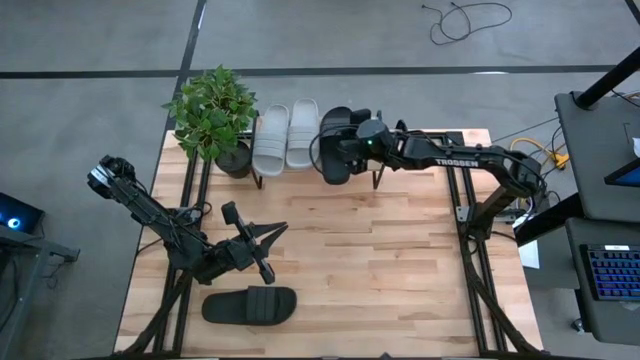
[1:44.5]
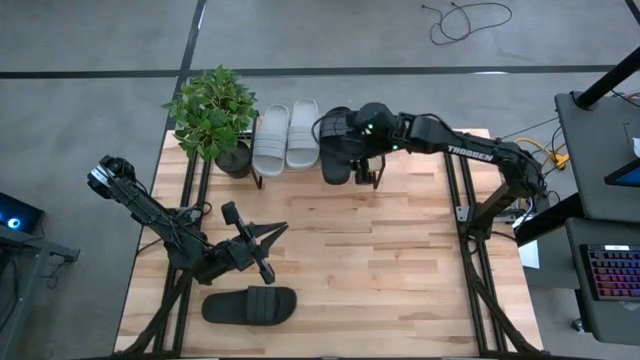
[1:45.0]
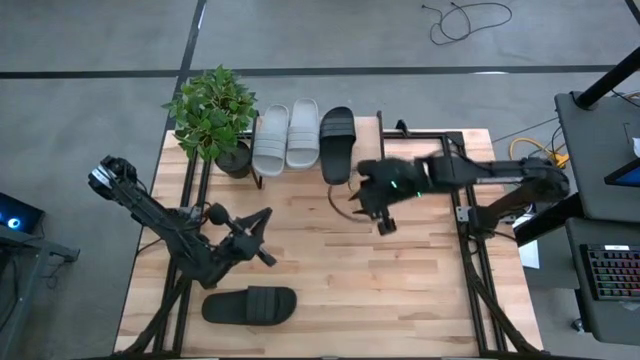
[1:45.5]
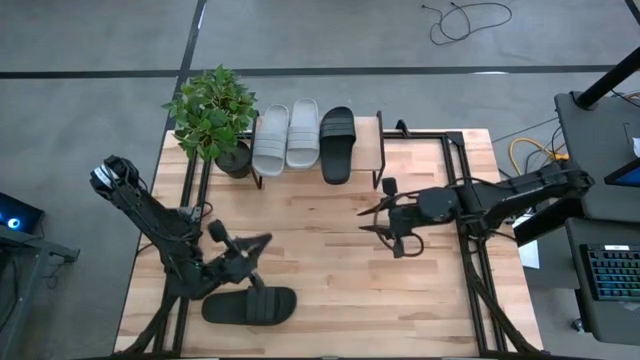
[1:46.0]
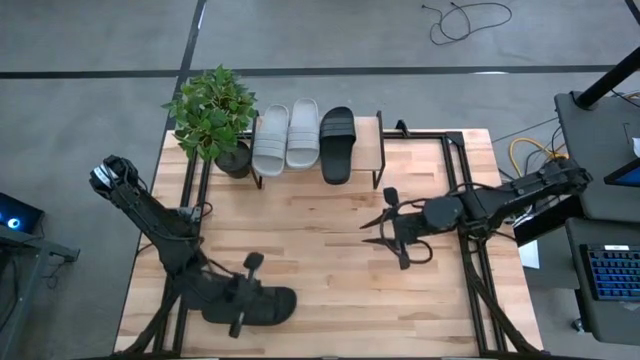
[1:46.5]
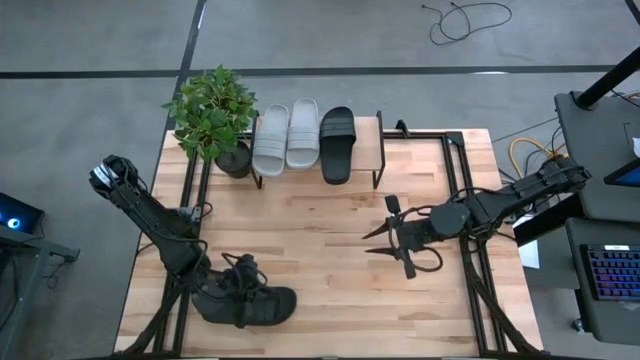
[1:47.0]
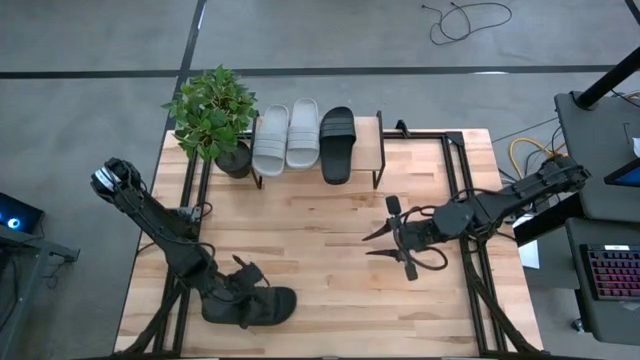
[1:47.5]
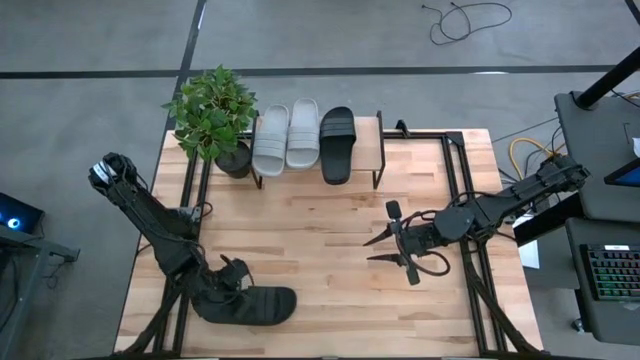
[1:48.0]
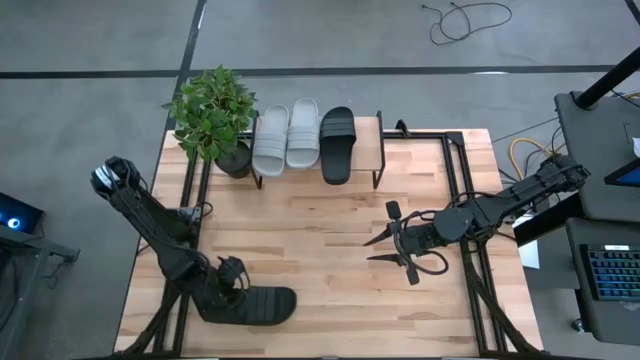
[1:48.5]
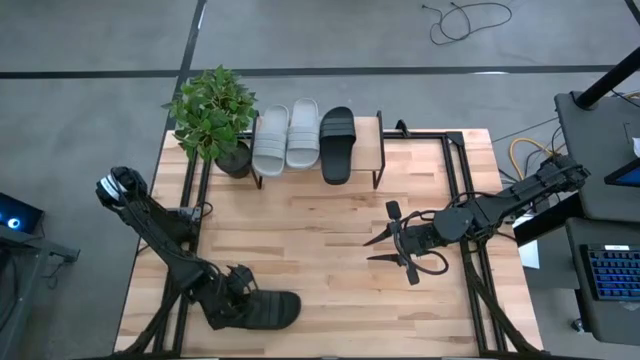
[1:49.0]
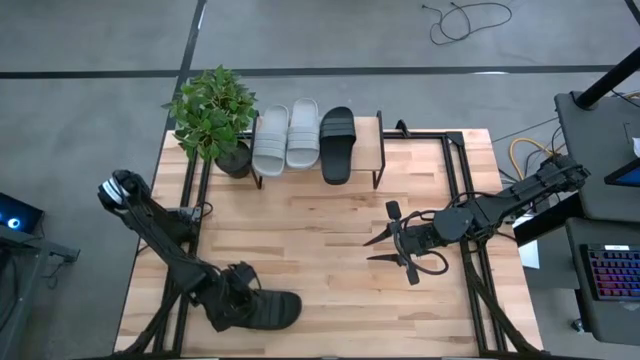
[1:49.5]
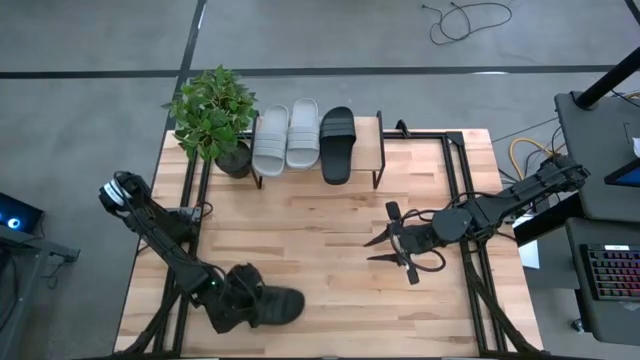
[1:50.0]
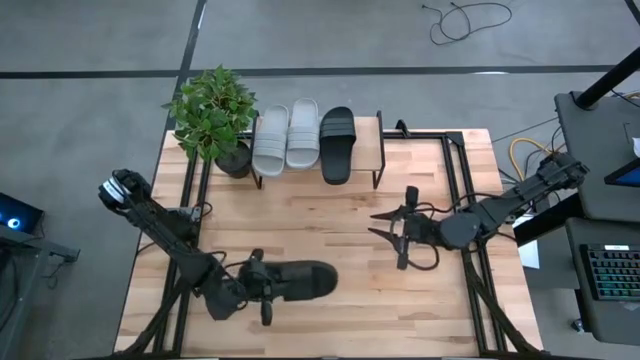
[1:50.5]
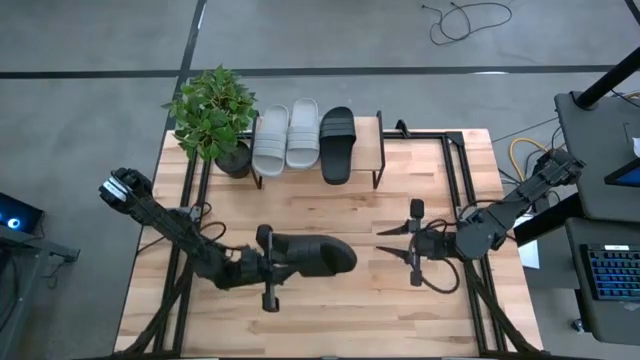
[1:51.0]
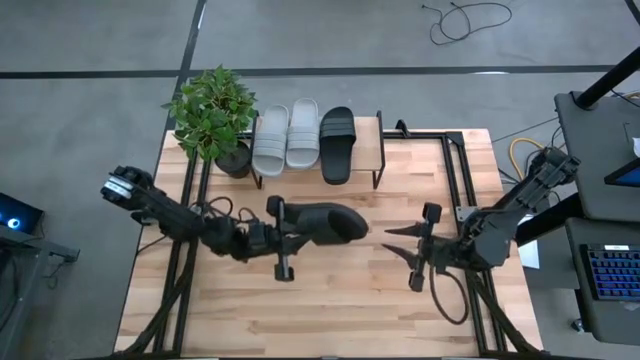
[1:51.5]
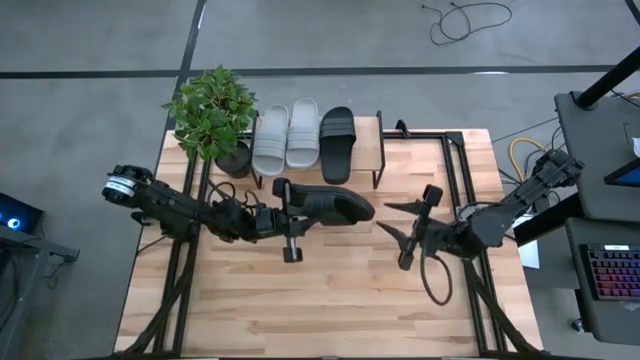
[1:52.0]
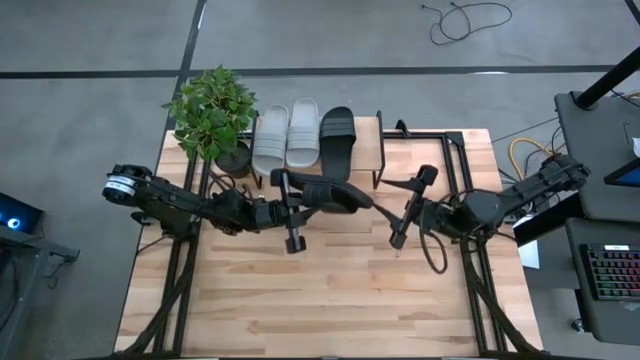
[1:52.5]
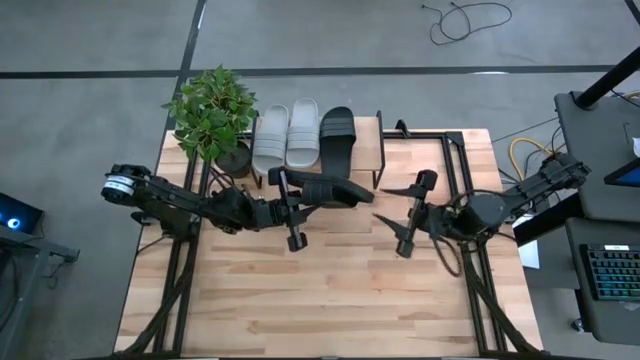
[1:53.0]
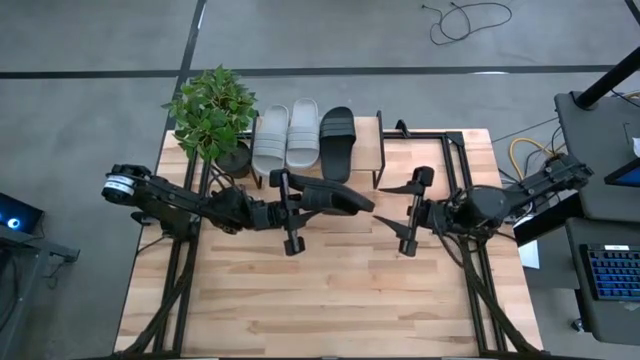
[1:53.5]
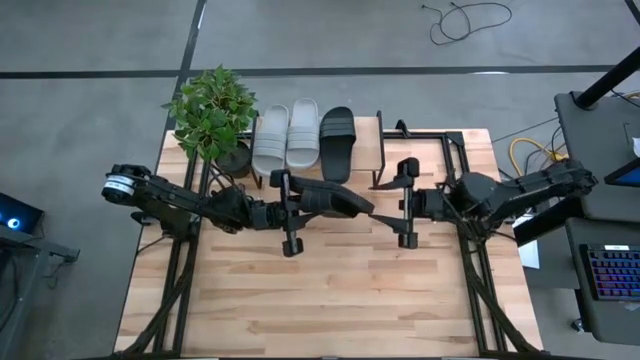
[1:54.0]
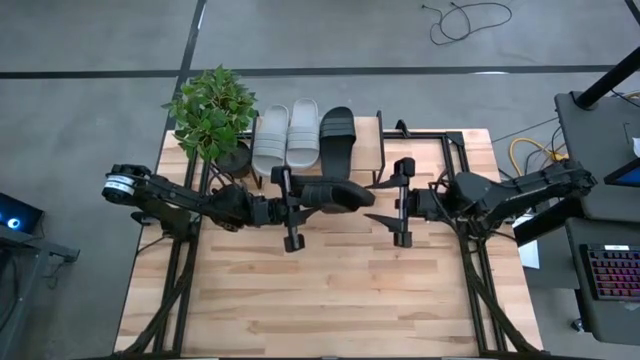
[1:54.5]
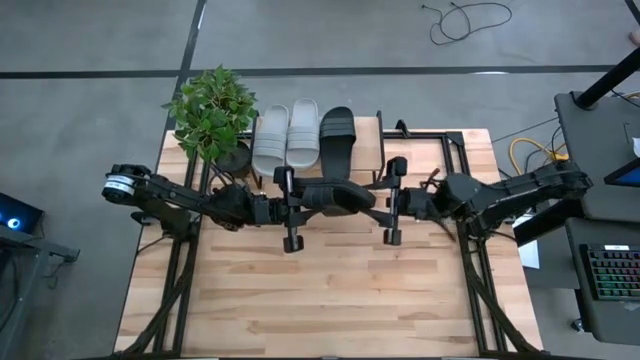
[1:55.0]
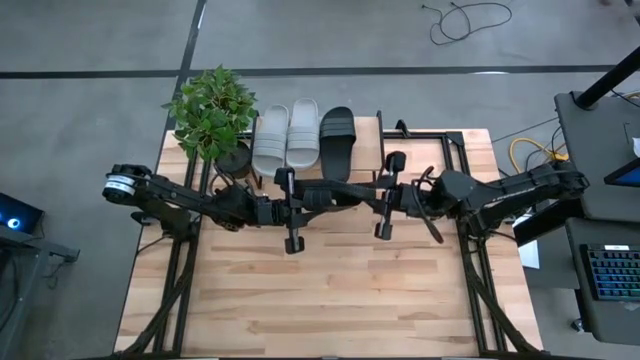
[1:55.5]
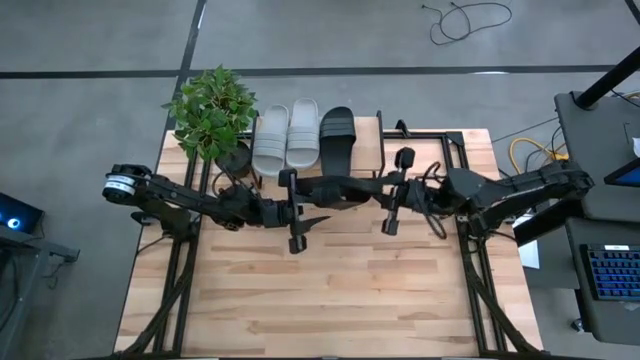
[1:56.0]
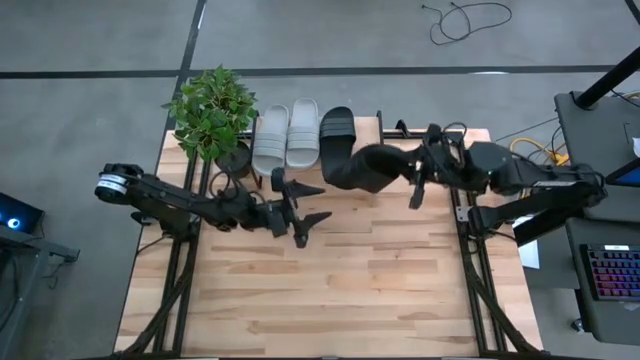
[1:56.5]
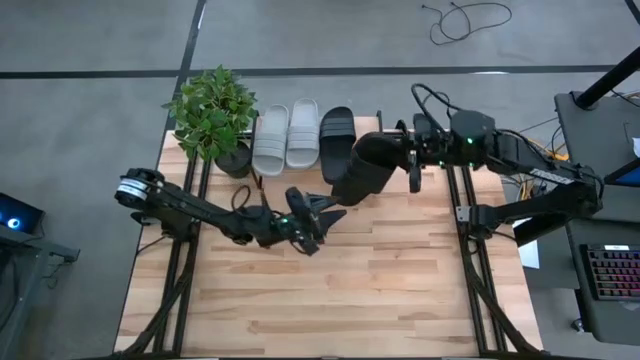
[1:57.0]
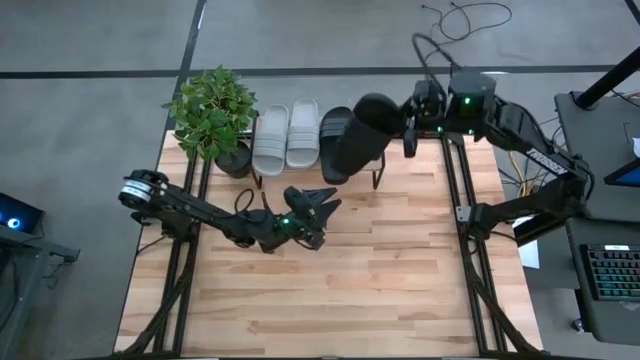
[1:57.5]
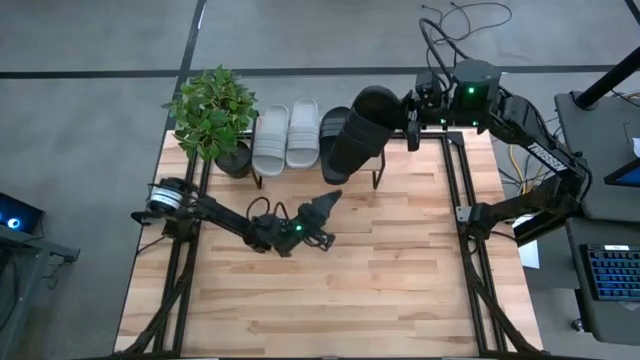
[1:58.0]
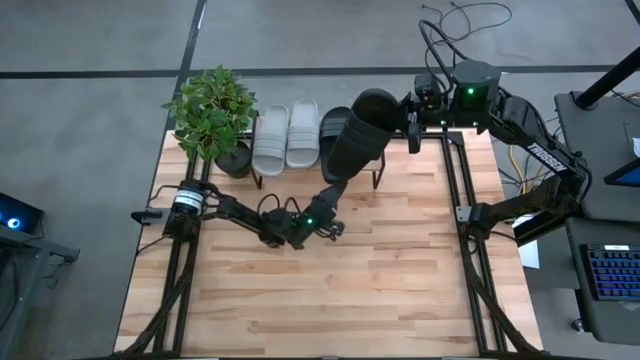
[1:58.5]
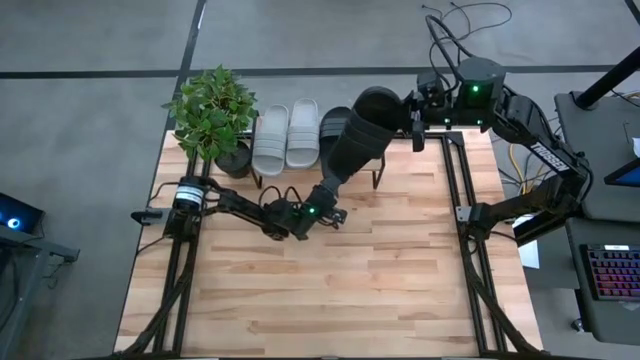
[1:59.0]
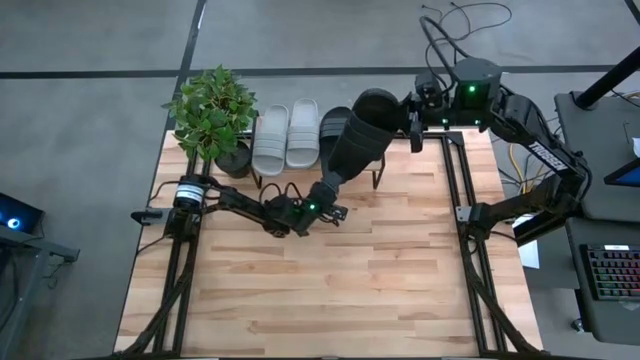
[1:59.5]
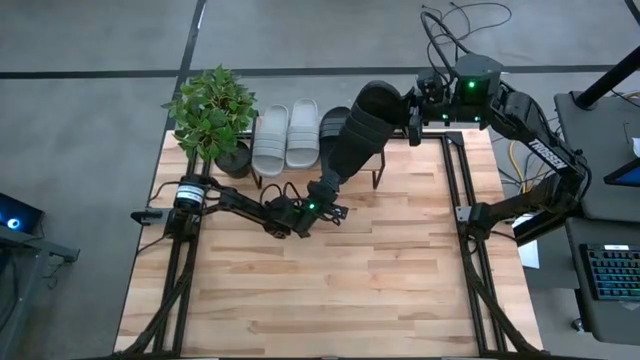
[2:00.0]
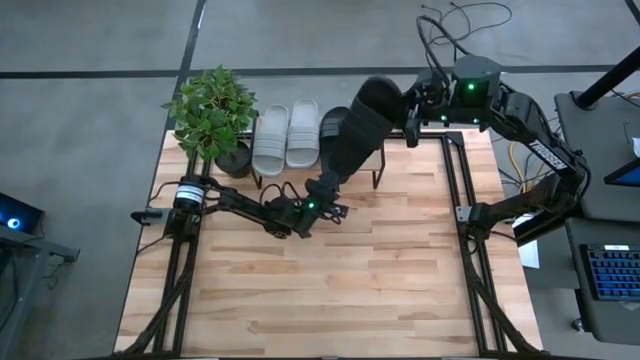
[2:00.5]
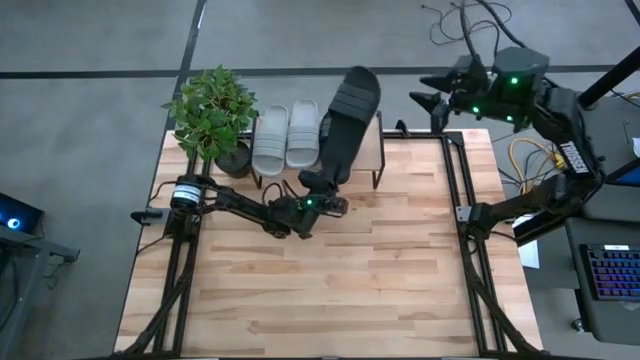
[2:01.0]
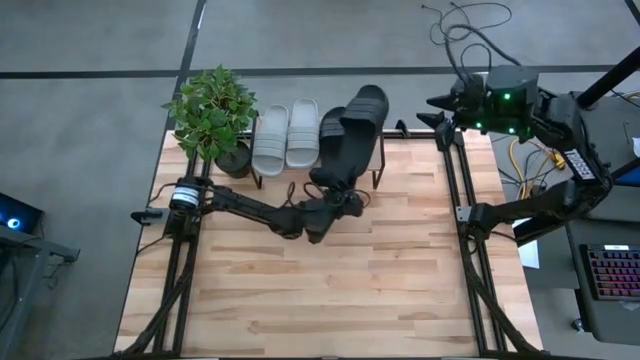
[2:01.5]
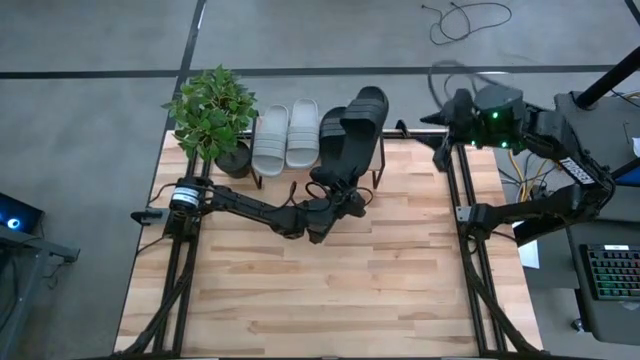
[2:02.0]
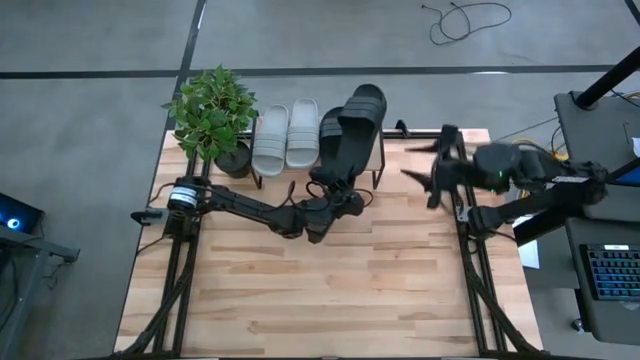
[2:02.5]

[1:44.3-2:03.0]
Task: Pick and place slides into the shelf
Put the black slipper on the shelf

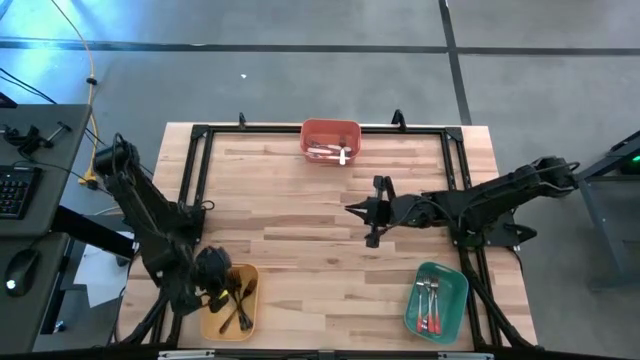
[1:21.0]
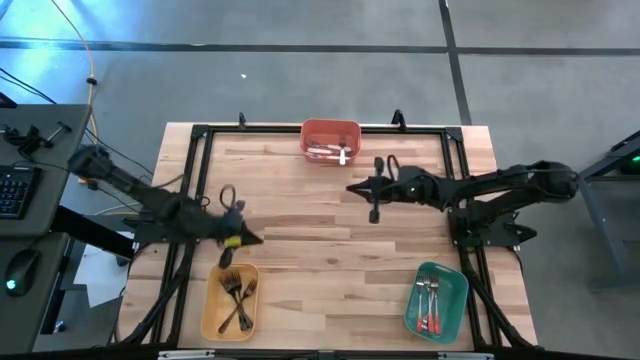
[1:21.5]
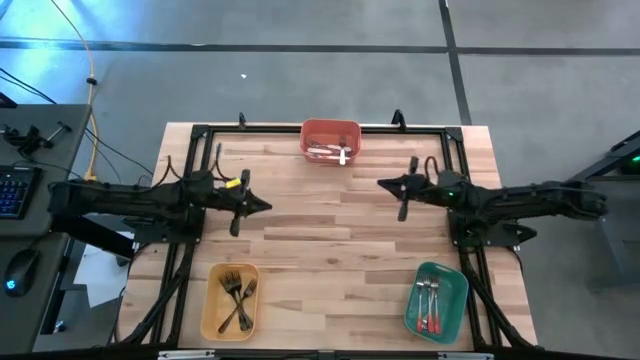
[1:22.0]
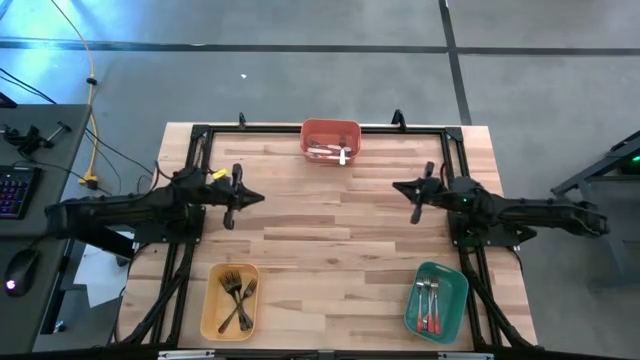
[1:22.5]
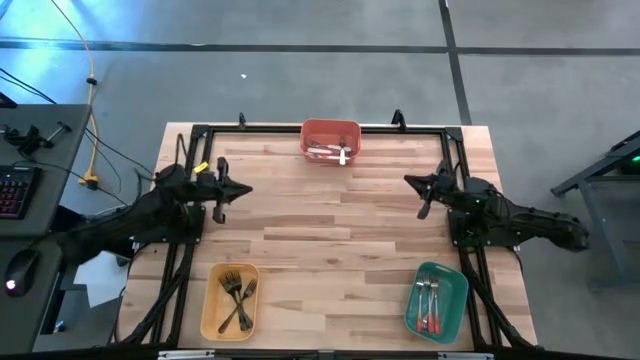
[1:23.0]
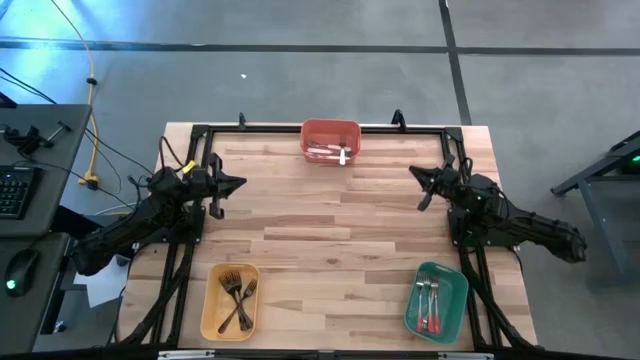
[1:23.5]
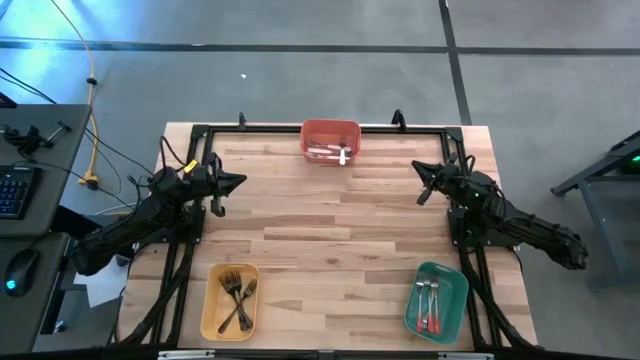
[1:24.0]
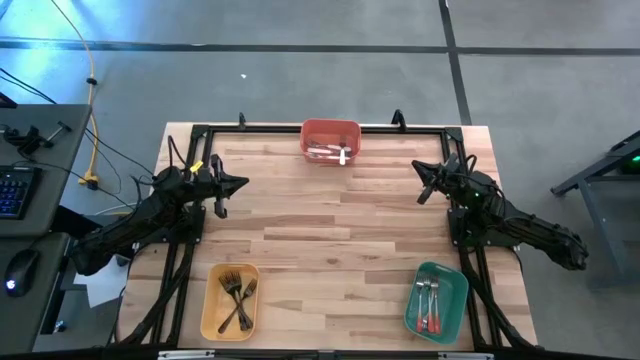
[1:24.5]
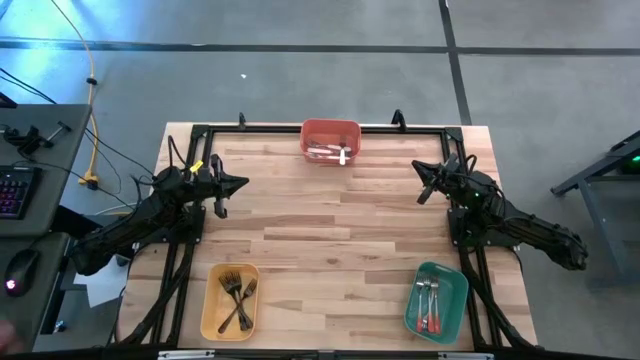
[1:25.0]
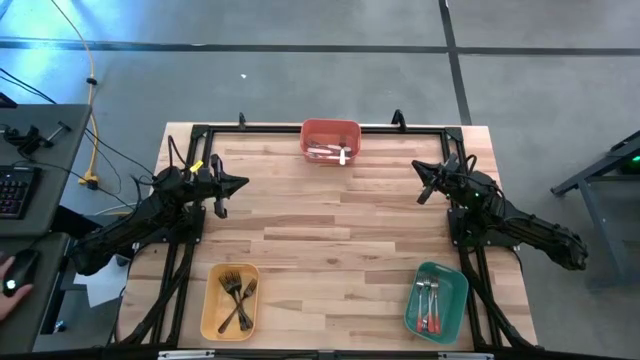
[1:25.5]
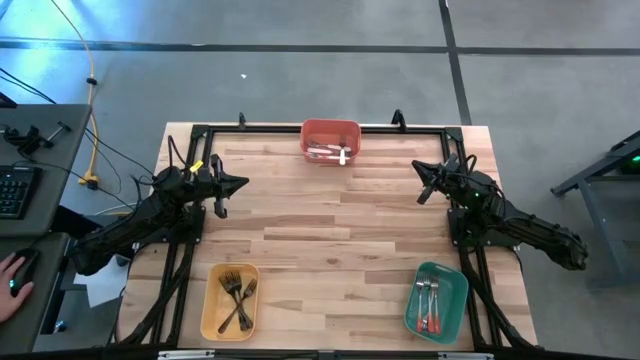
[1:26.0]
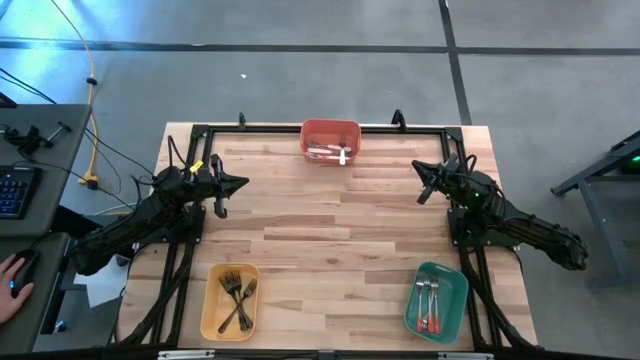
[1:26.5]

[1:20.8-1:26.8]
Task: Sort silverware by color (type)
Return to Home Position
